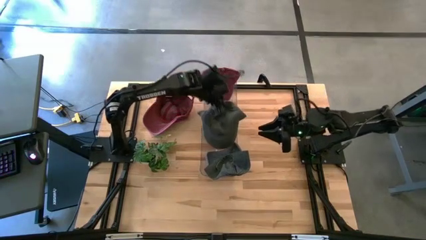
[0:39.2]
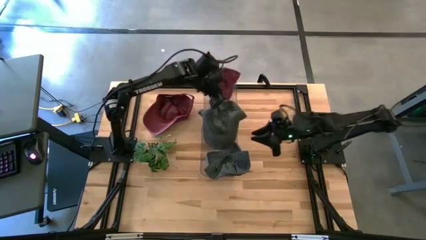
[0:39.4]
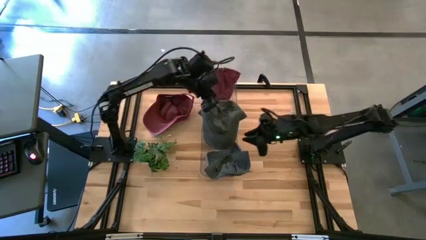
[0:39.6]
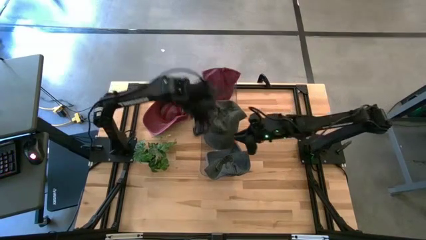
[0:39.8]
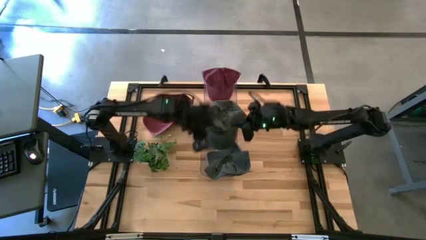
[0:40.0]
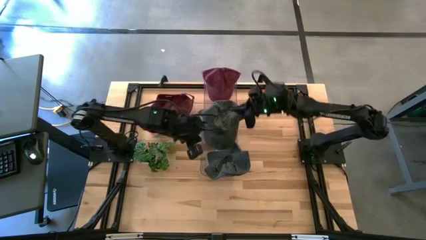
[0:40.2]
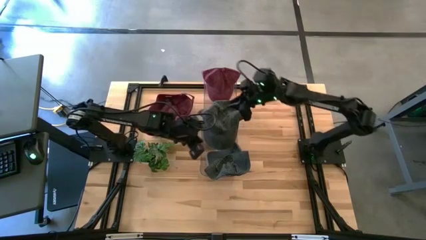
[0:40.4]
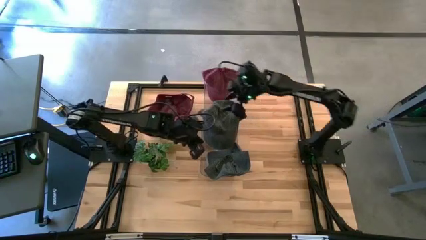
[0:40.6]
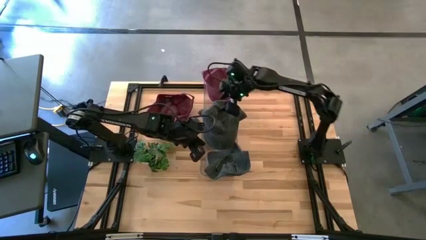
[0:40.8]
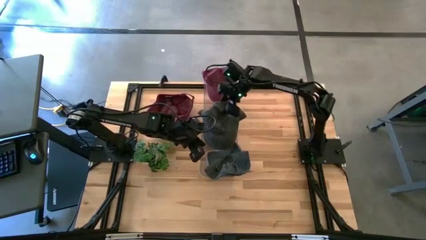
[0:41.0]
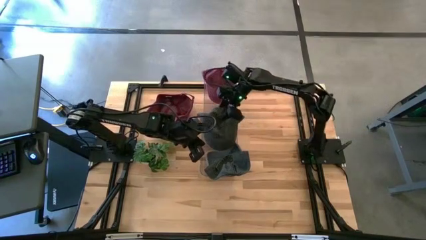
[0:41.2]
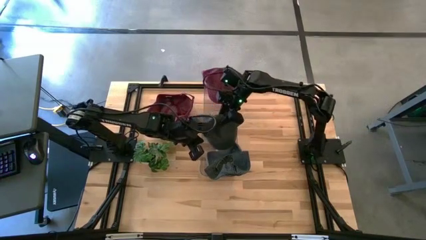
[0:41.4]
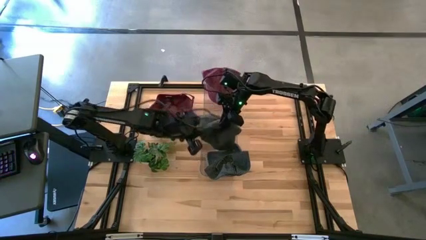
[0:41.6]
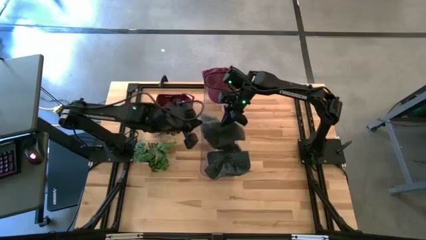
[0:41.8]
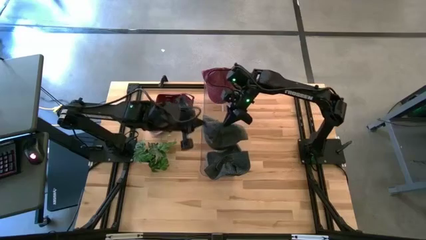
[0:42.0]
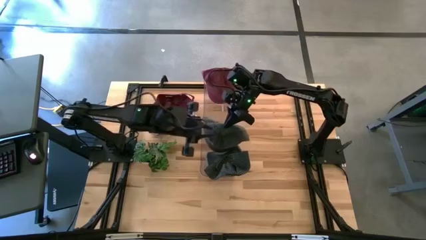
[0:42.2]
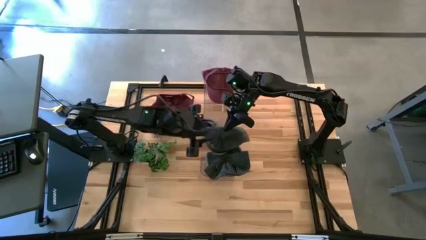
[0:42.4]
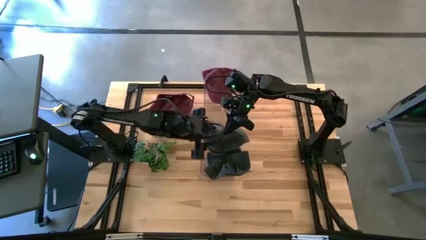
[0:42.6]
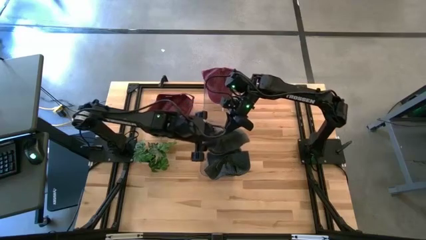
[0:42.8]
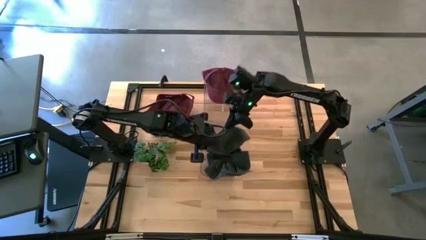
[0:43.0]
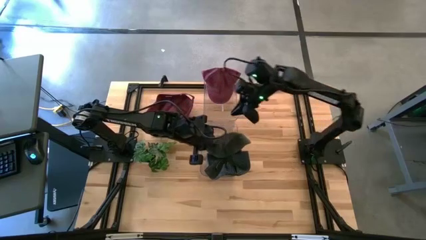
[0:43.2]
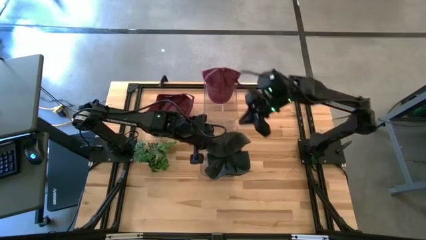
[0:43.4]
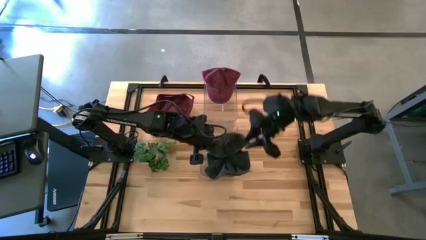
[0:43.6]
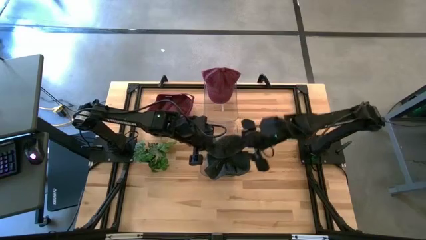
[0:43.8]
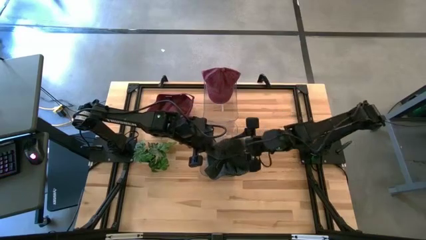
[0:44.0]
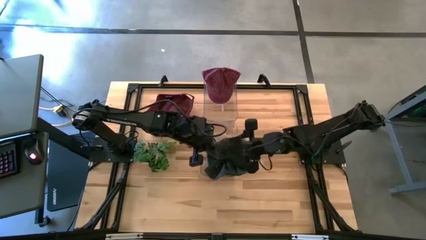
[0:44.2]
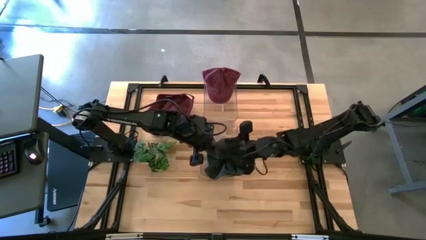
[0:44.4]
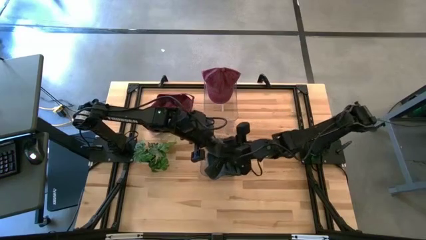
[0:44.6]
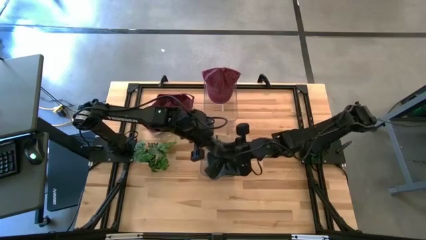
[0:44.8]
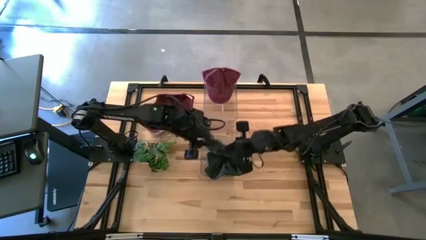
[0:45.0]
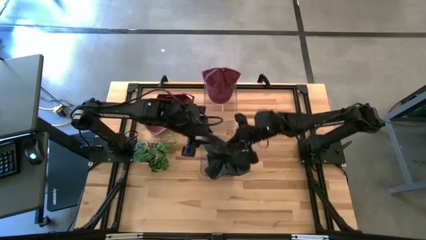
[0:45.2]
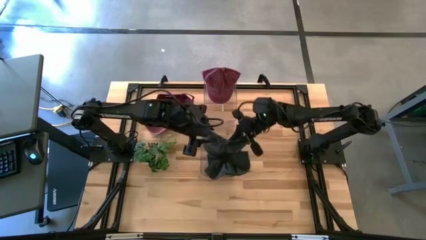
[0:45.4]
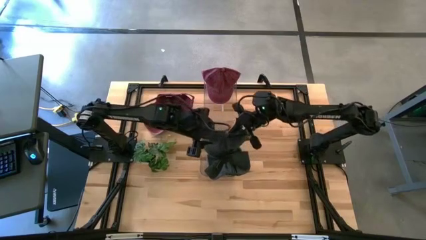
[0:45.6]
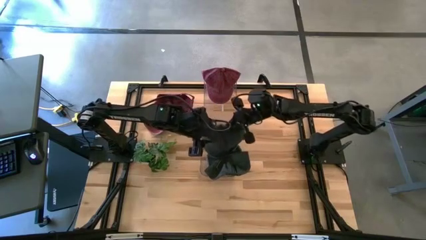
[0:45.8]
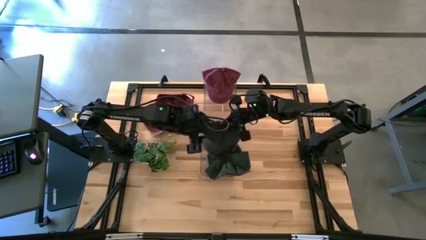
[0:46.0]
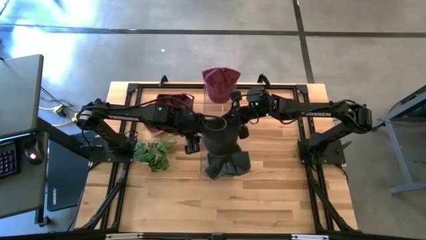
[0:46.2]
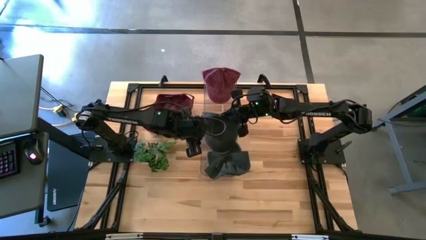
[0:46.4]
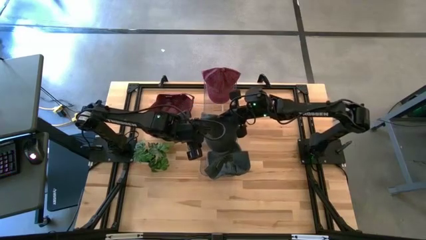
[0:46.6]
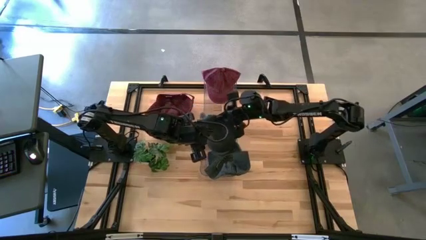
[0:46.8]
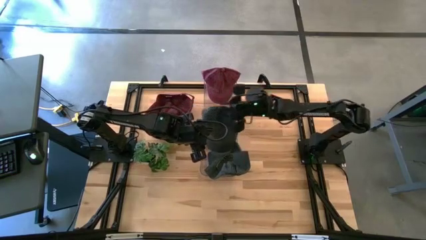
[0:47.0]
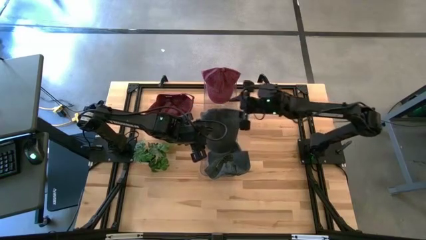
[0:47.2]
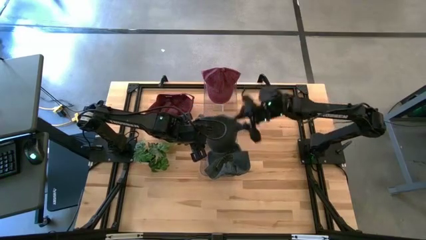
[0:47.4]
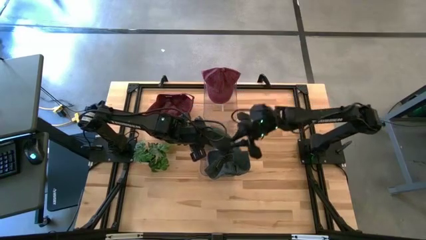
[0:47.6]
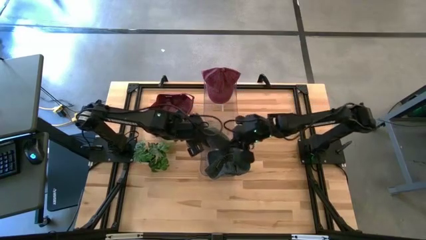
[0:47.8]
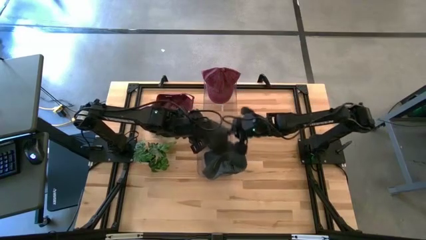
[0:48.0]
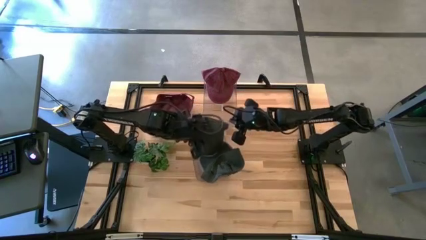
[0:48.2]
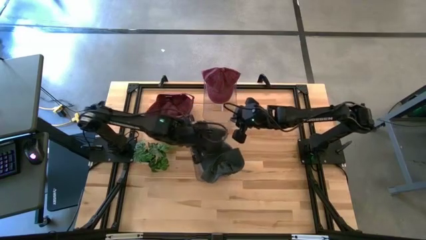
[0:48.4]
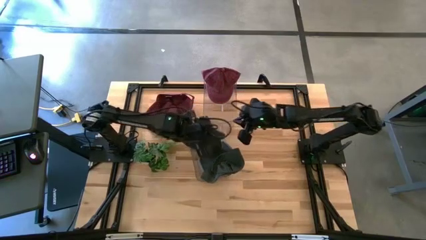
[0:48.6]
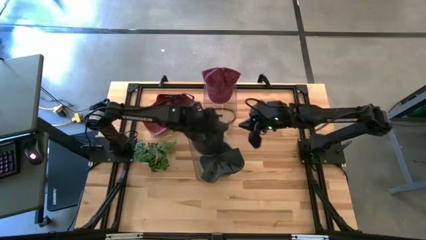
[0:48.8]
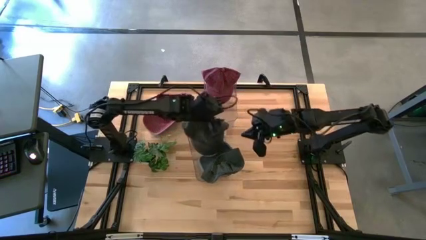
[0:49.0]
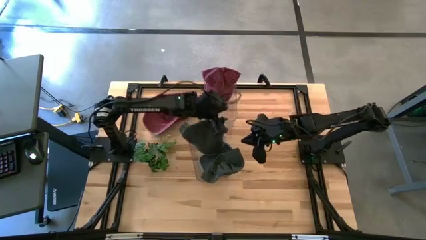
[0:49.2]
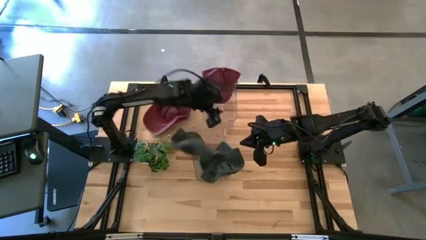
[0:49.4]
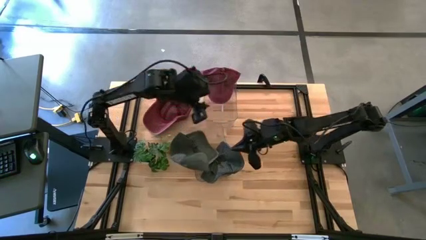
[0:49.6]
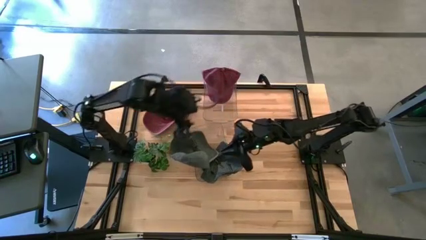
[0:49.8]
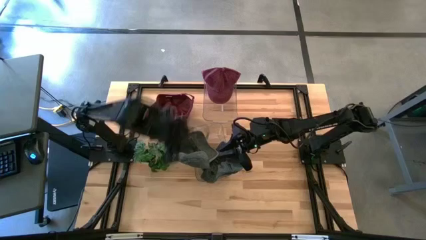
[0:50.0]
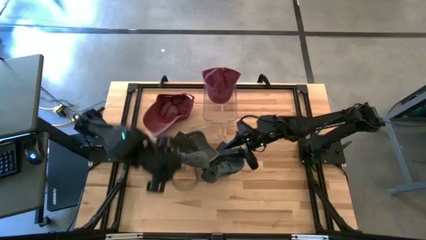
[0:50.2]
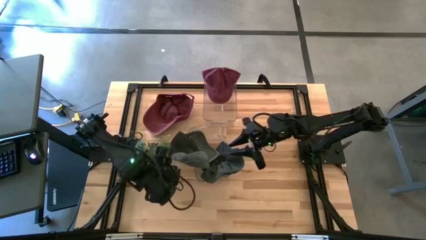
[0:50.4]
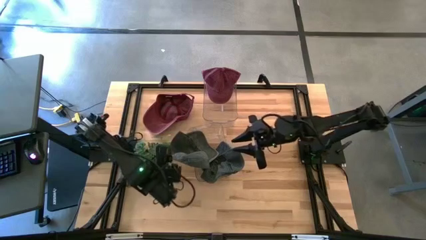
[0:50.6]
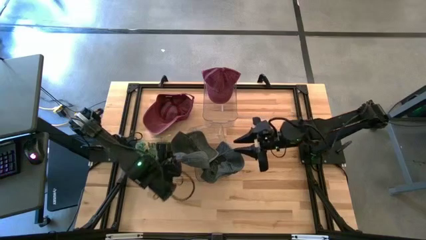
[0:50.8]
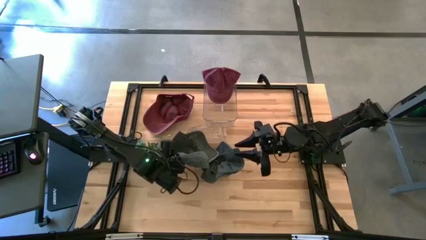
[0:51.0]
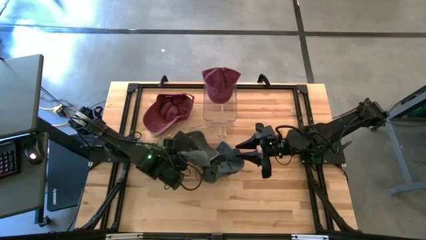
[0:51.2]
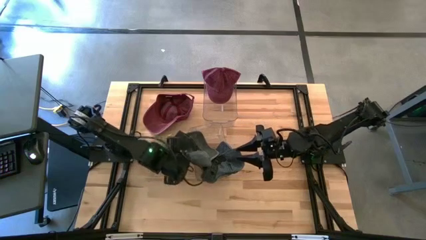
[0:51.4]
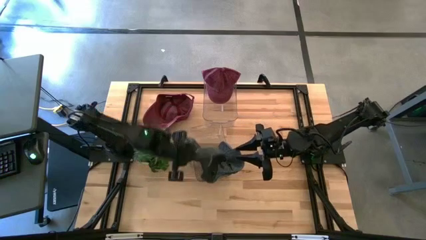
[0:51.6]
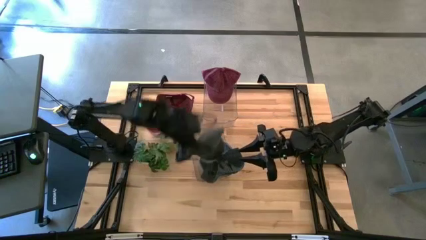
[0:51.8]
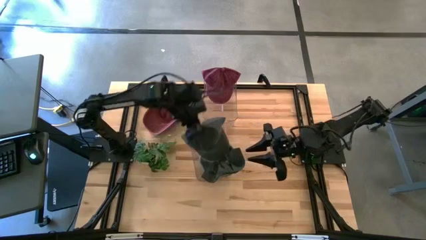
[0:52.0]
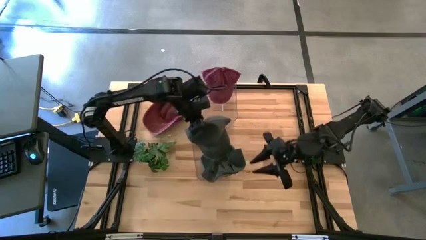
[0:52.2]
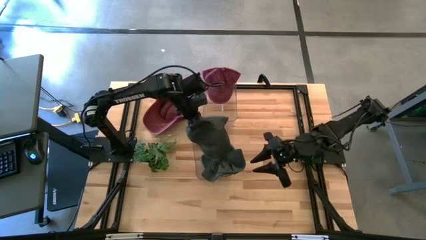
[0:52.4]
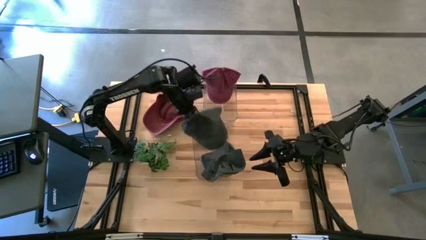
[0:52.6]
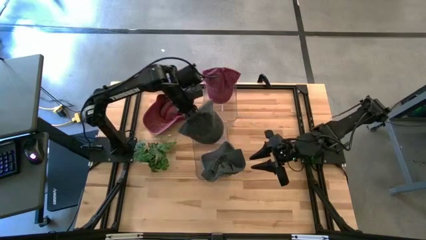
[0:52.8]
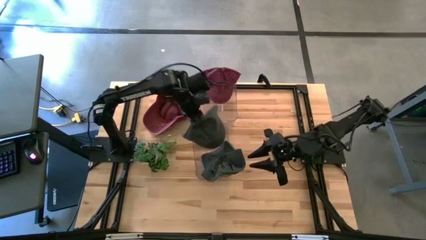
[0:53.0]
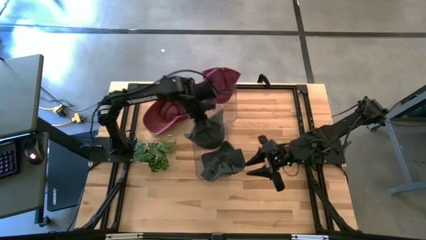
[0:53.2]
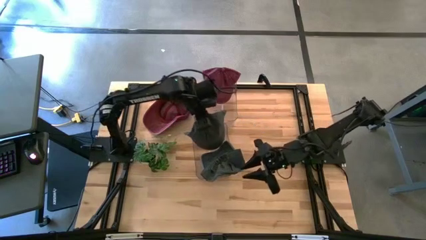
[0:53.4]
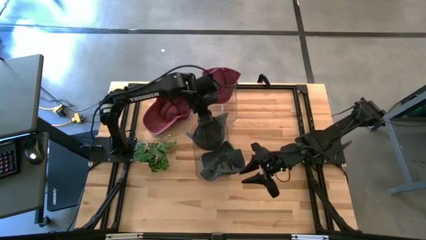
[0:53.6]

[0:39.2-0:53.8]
Task: Pick & Place hat
Put the black cap into the bottom transparent bin

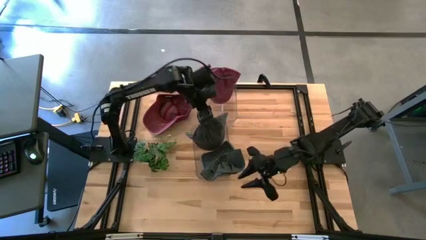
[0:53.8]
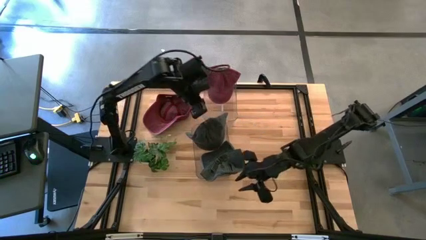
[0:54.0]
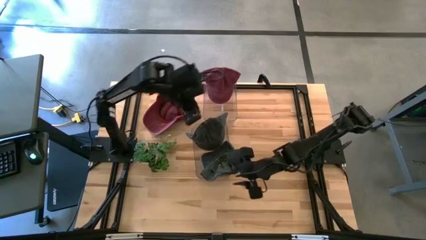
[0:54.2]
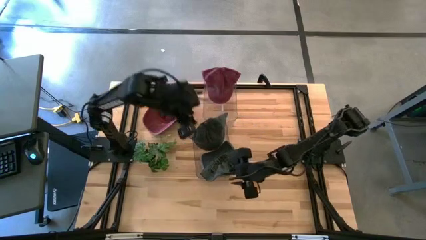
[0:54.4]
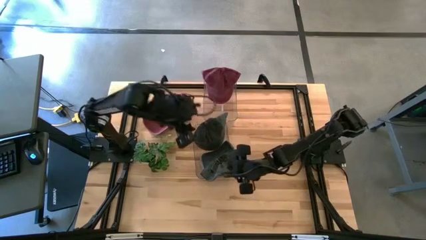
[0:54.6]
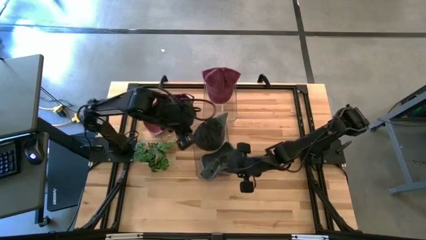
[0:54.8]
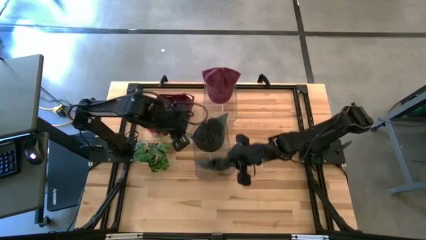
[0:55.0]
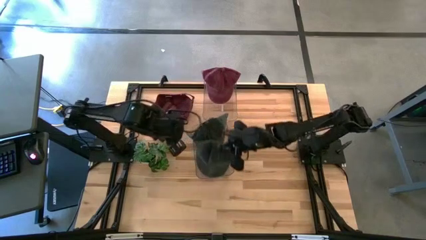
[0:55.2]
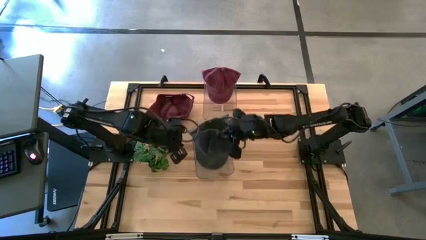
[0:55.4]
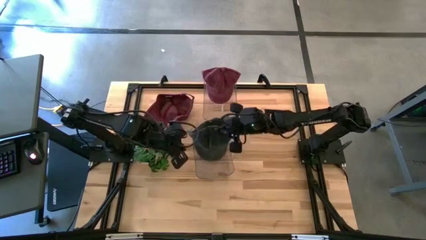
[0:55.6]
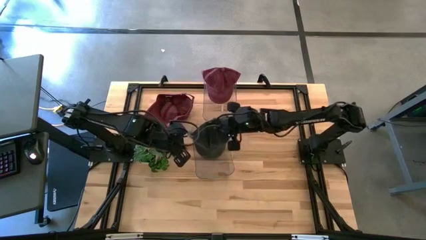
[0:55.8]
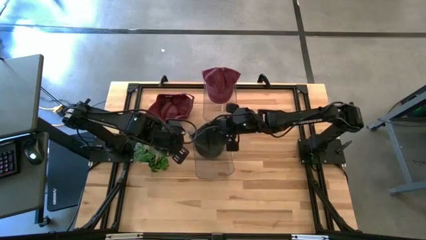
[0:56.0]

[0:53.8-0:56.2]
Adjust the black cap
